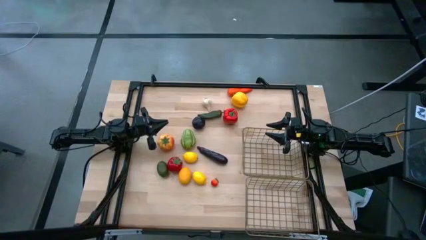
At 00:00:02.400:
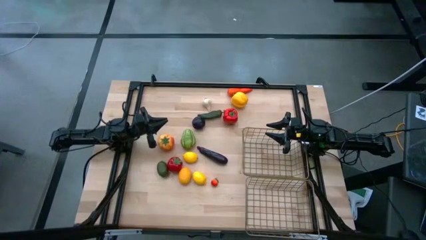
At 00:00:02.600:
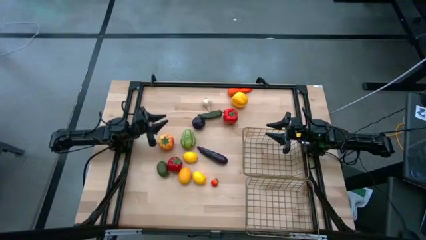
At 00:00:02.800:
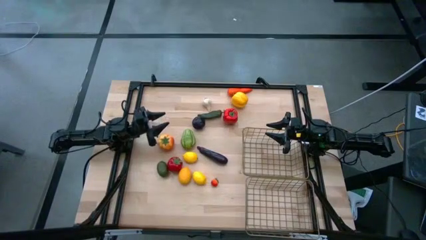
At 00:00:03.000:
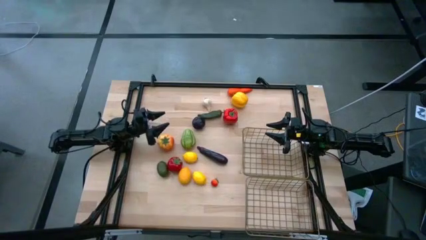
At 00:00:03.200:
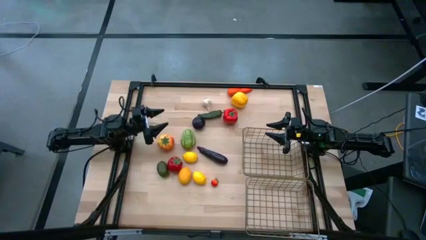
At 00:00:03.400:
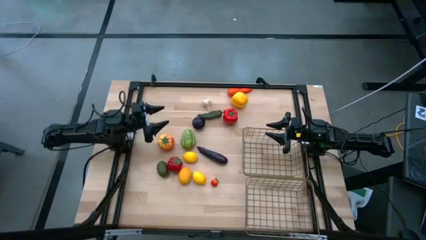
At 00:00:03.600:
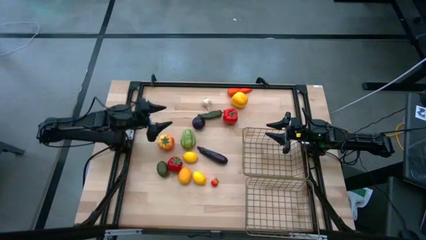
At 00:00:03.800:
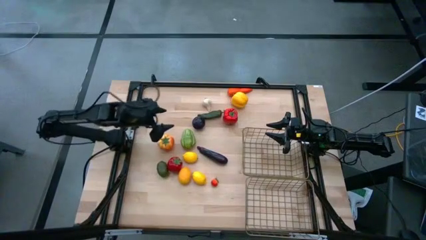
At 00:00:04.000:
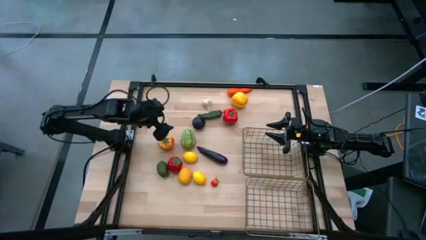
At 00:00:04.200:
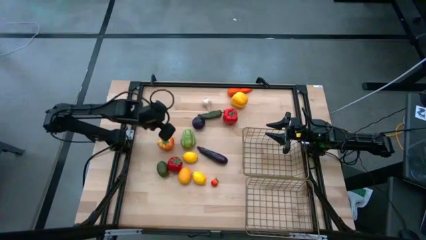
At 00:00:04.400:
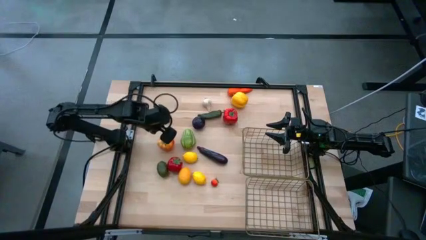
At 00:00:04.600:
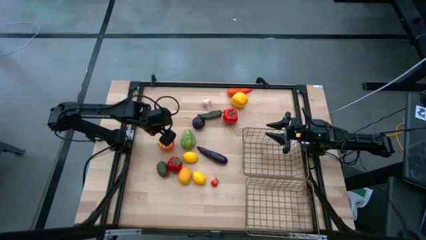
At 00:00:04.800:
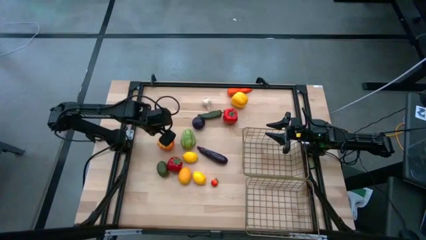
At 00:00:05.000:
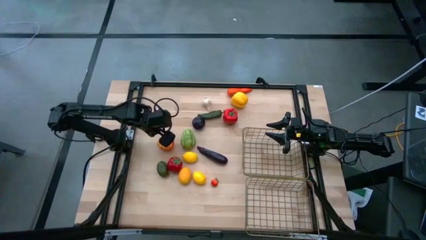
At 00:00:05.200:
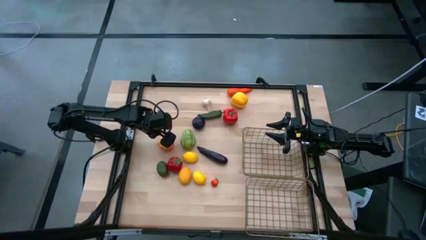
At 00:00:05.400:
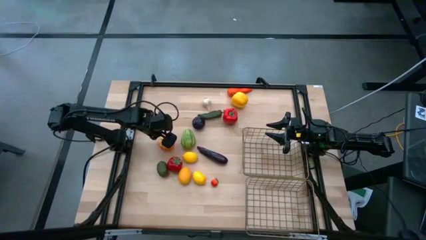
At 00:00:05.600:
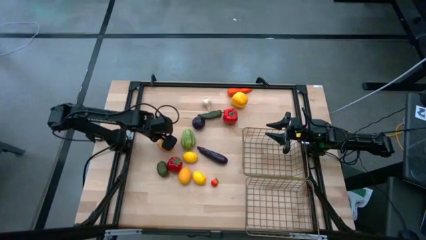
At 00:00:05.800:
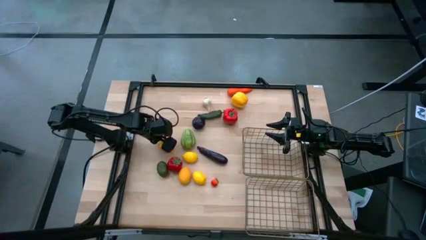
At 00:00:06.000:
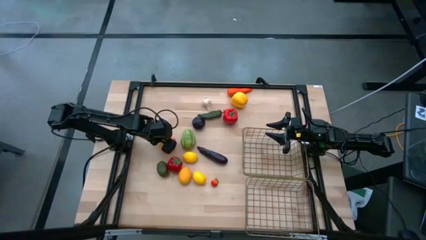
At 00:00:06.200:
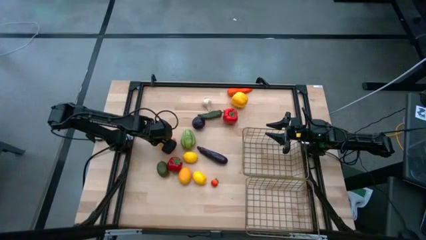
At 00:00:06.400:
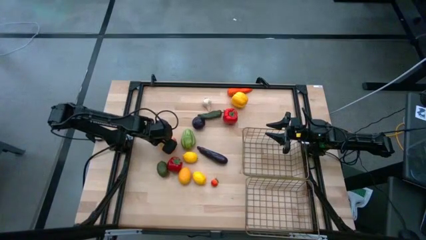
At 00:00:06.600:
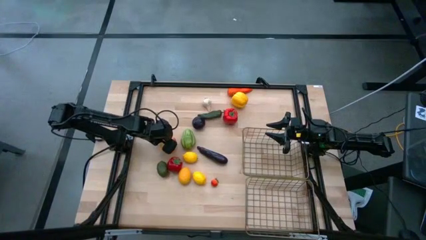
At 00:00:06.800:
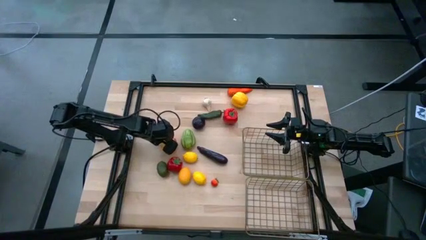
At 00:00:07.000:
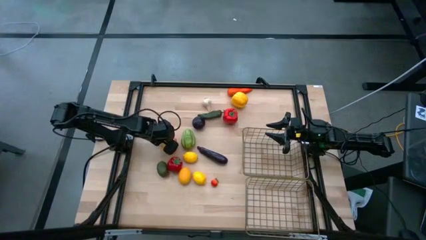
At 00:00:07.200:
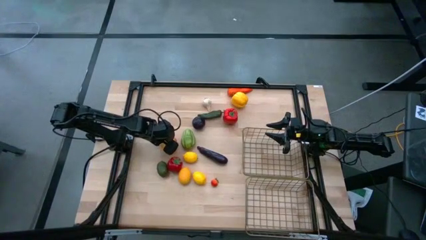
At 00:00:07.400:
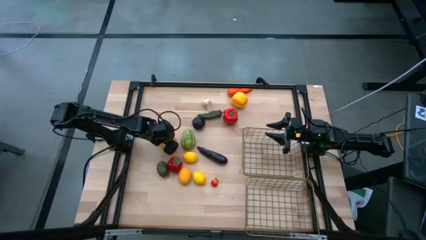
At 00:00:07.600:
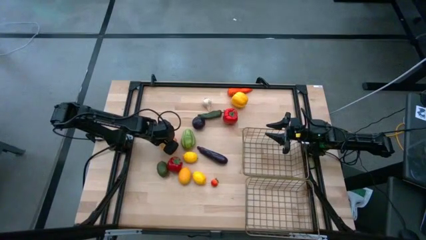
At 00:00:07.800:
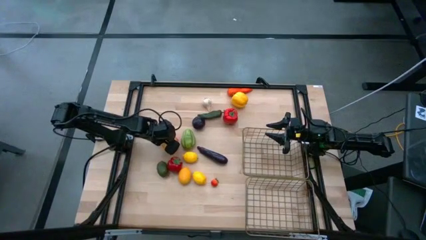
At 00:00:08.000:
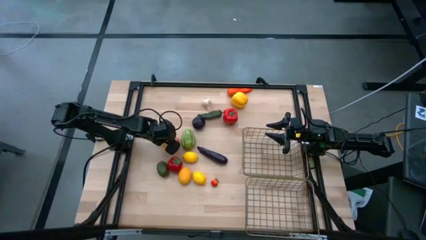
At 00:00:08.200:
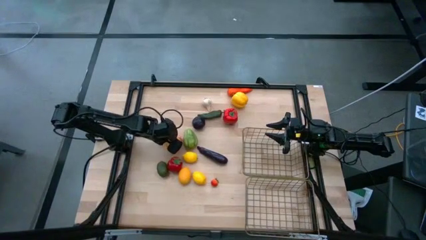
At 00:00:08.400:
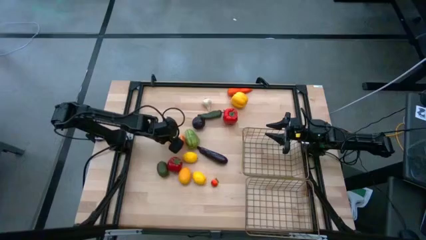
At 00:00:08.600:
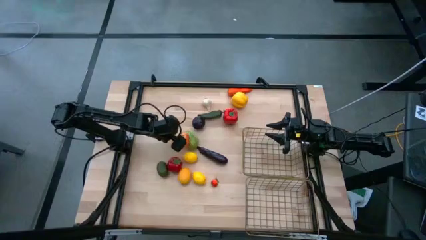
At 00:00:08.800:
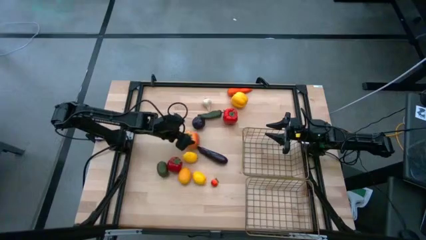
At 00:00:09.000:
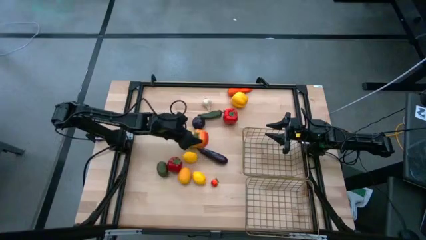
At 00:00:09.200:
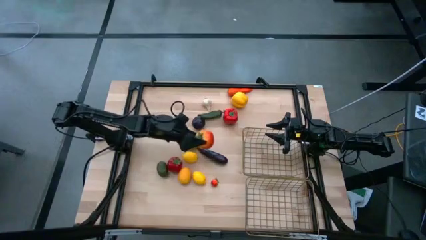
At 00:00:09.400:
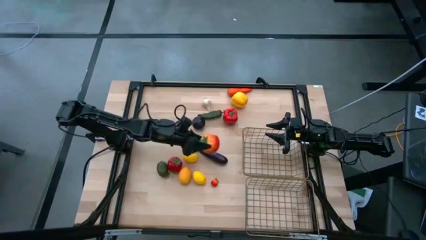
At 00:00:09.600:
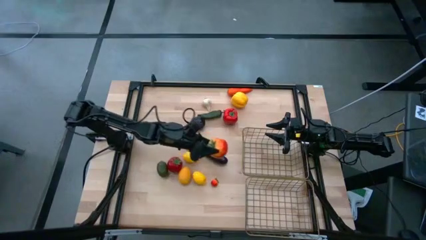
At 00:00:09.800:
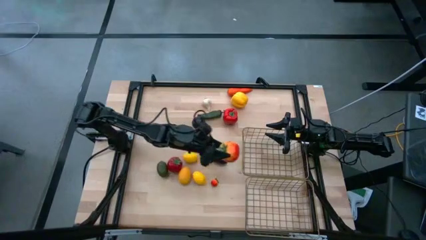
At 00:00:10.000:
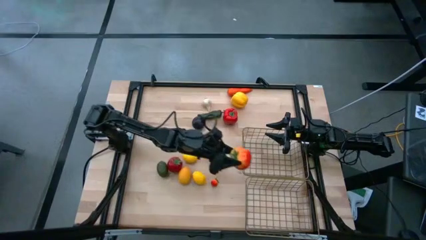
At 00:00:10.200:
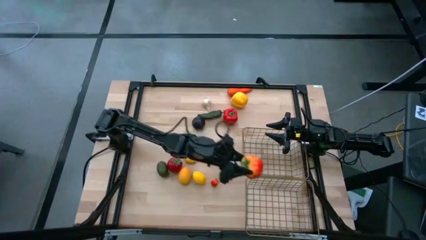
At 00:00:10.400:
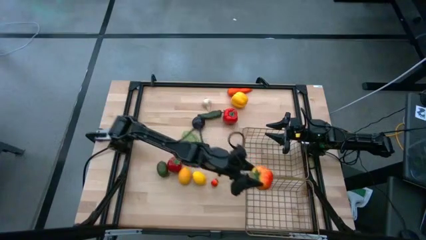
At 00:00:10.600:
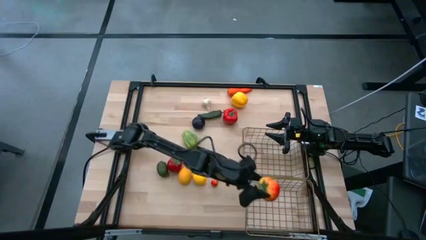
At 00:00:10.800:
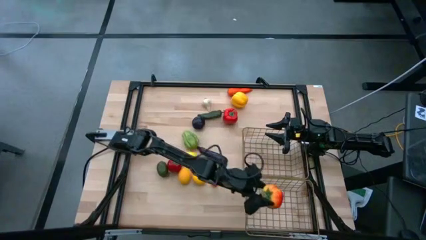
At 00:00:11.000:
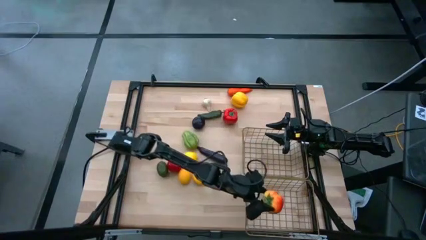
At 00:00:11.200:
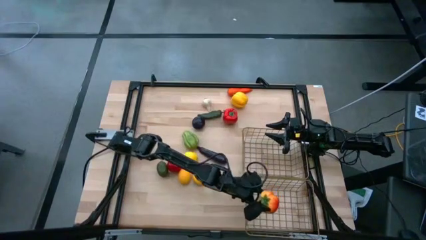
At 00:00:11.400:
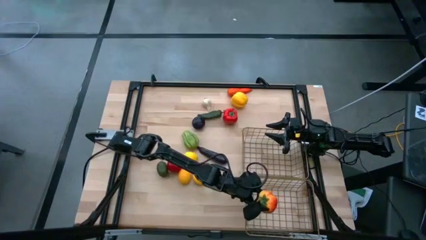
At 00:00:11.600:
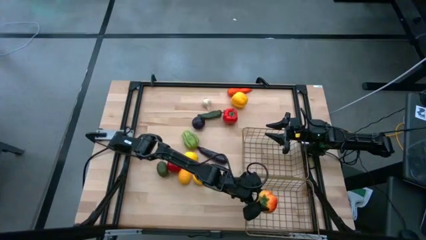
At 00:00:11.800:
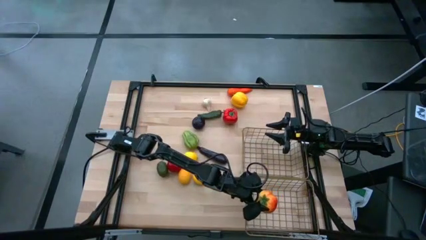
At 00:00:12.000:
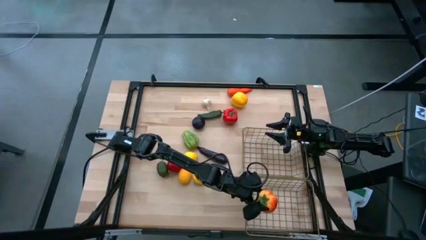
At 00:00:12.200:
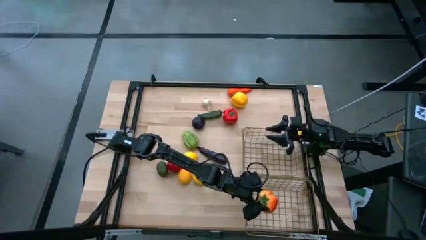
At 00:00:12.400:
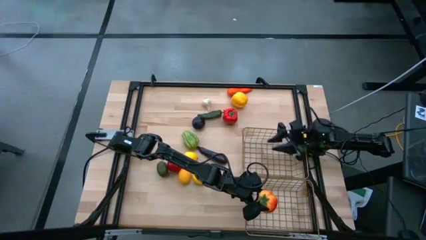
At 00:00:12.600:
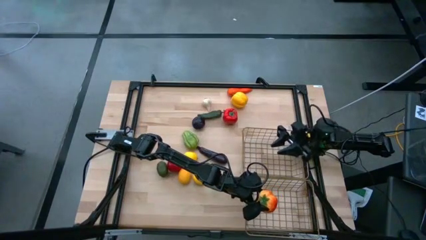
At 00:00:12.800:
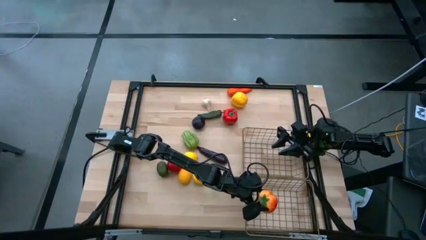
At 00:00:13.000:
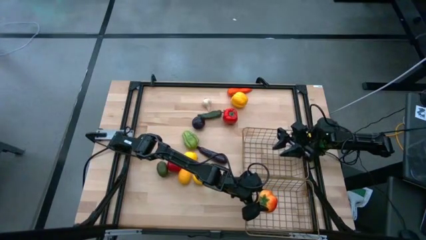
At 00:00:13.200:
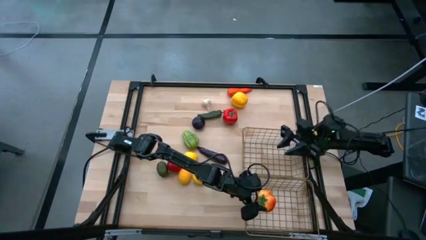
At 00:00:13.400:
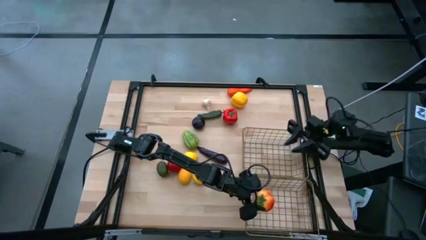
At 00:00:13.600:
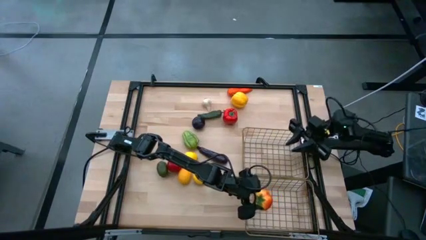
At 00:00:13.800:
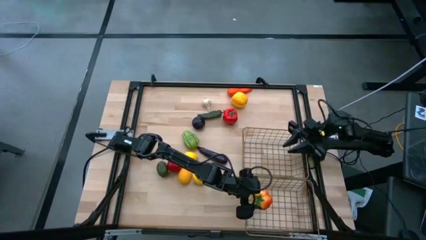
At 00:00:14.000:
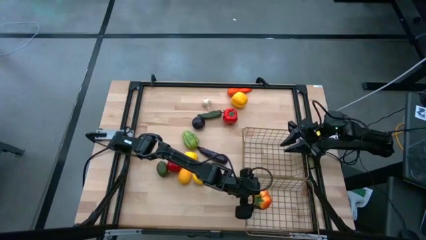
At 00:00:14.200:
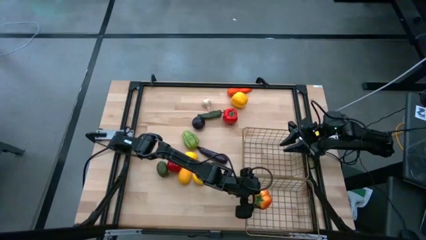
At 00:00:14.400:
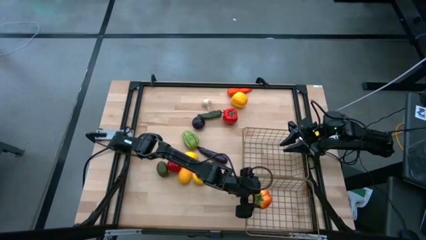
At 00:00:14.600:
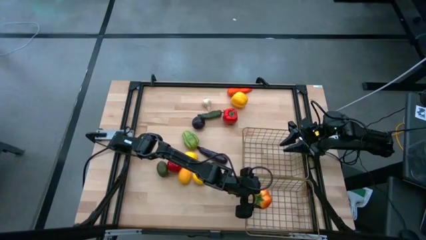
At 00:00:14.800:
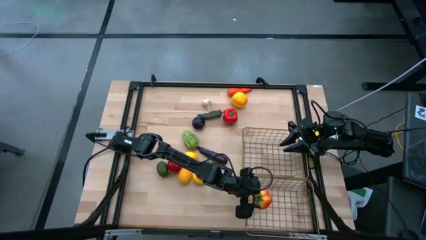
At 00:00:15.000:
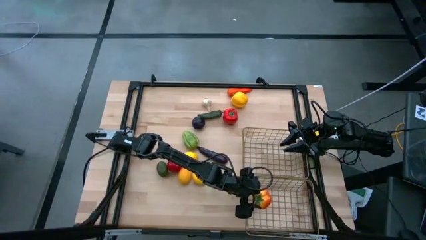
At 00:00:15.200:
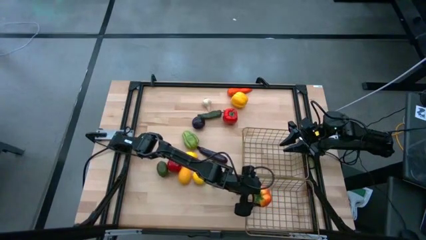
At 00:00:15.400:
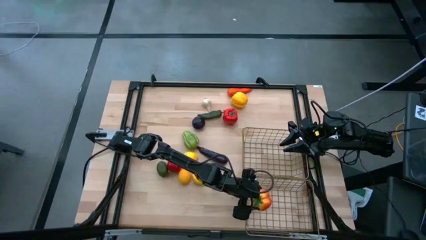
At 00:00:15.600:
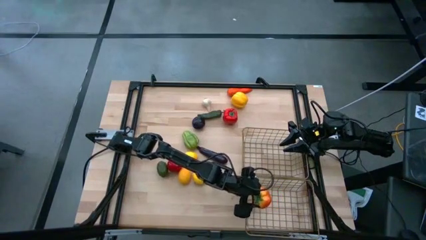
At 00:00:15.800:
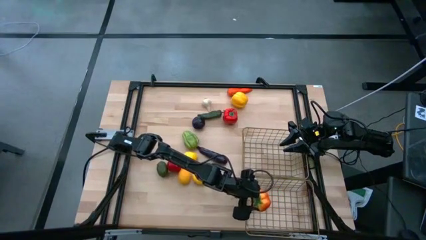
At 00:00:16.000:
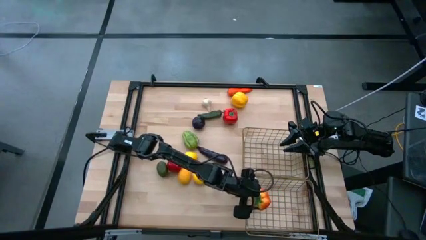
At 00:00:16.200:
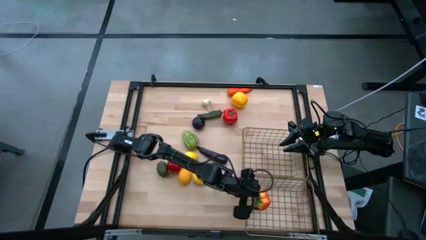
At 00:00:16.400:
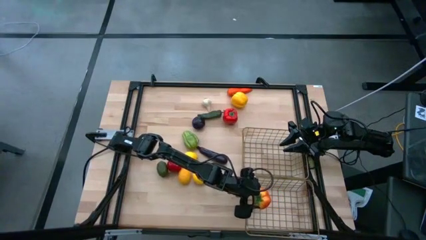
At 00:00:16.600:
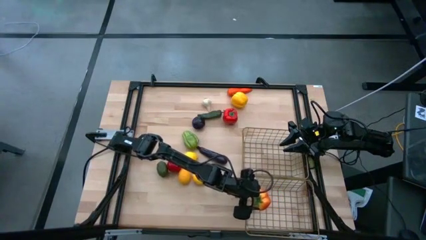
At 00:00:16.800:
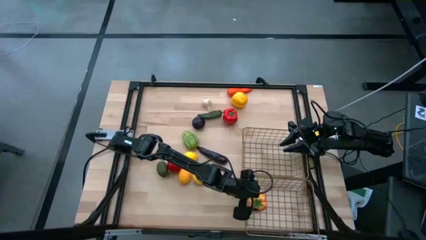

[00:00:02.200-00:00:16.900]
Task: Sort produce into baskets
Put the top orange tomato into the bottom wire basket
